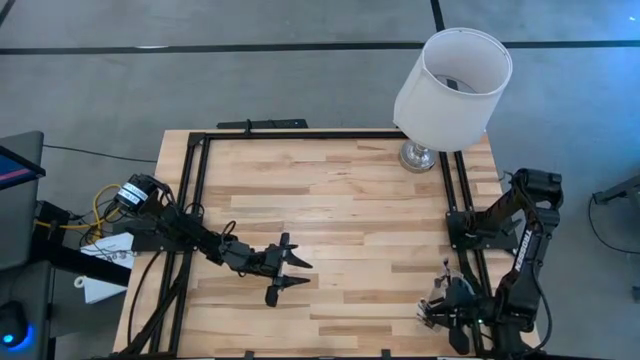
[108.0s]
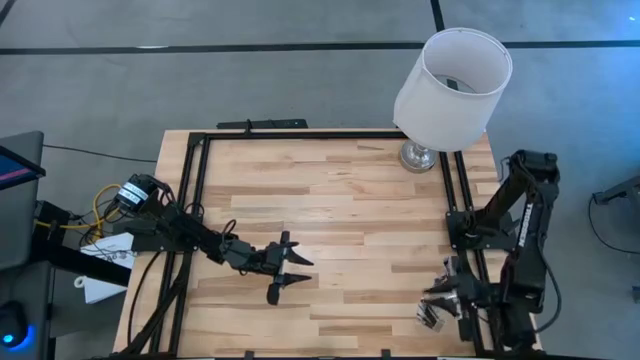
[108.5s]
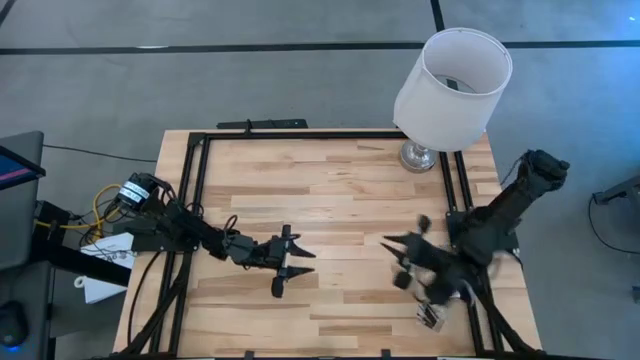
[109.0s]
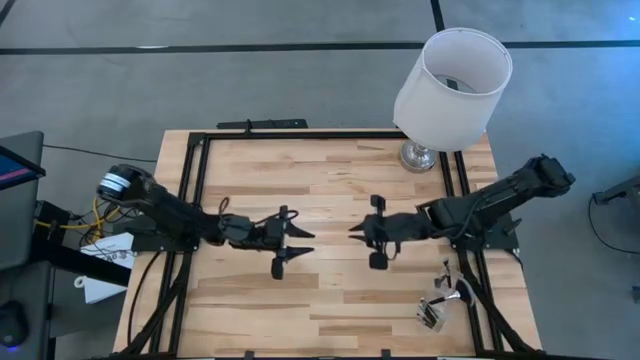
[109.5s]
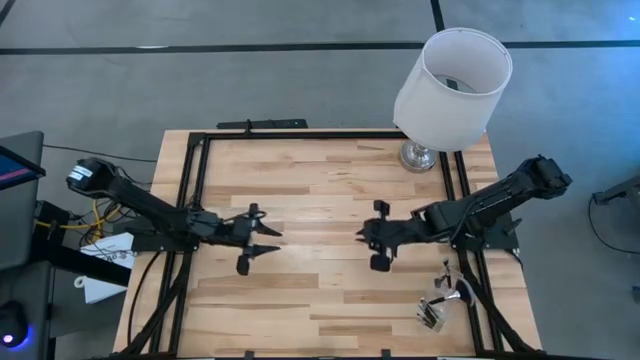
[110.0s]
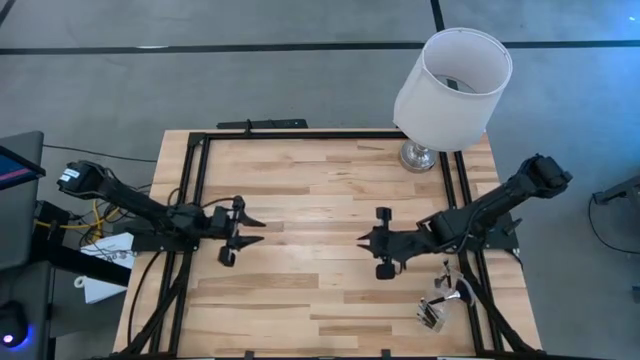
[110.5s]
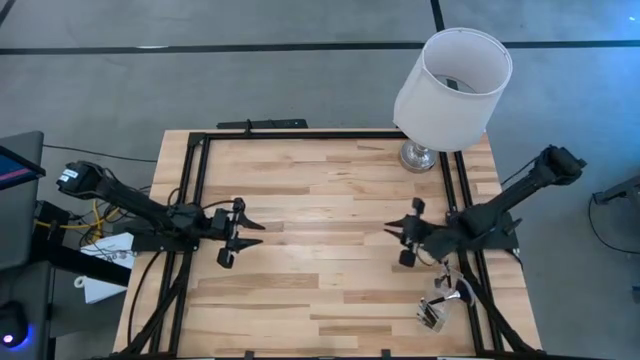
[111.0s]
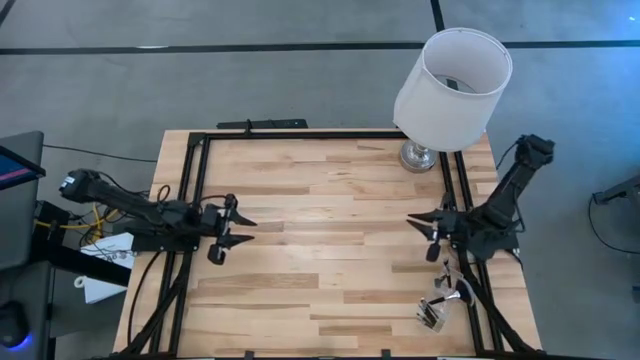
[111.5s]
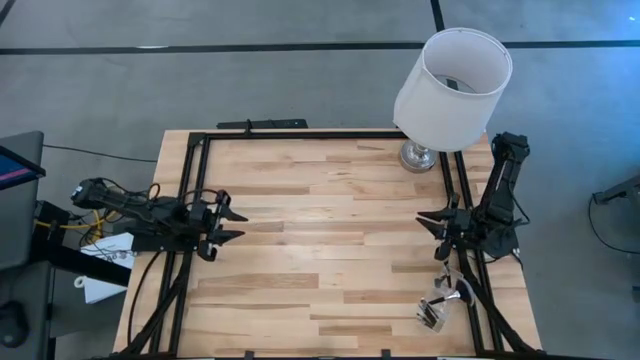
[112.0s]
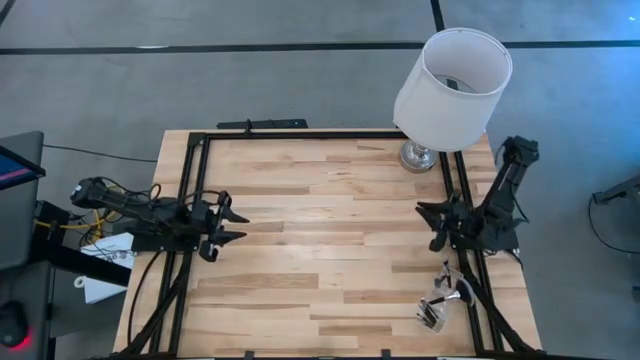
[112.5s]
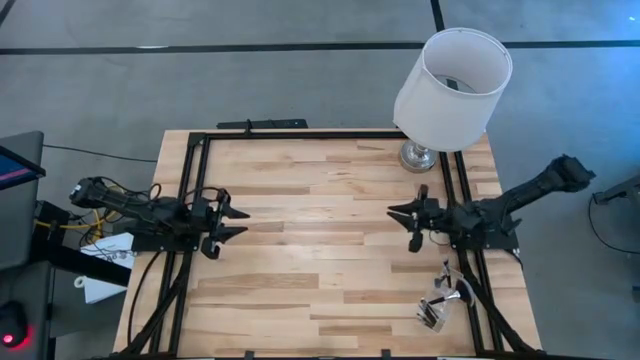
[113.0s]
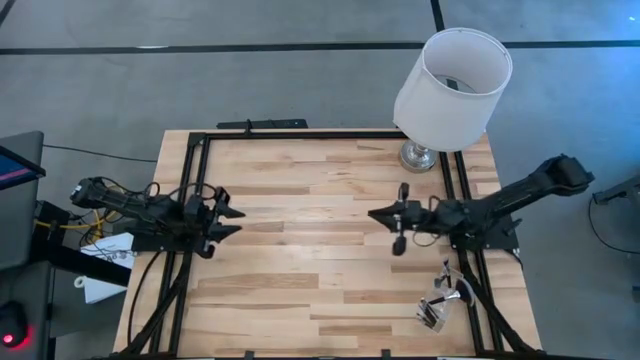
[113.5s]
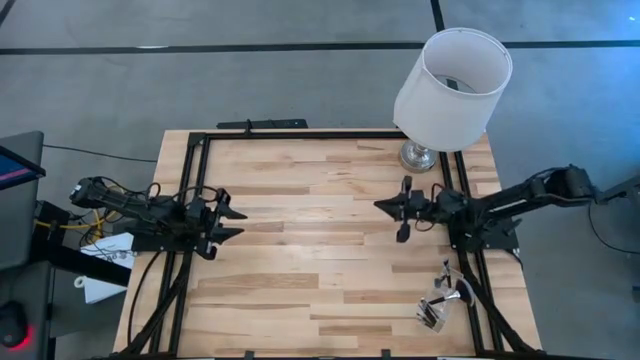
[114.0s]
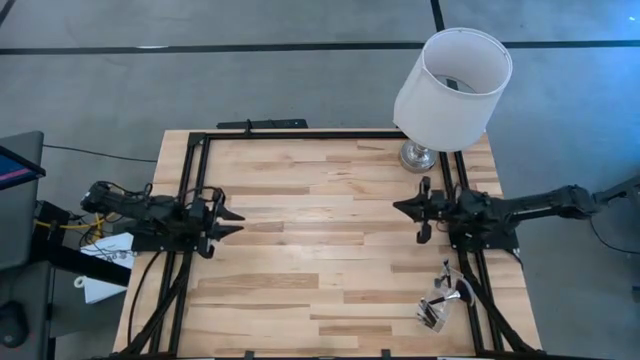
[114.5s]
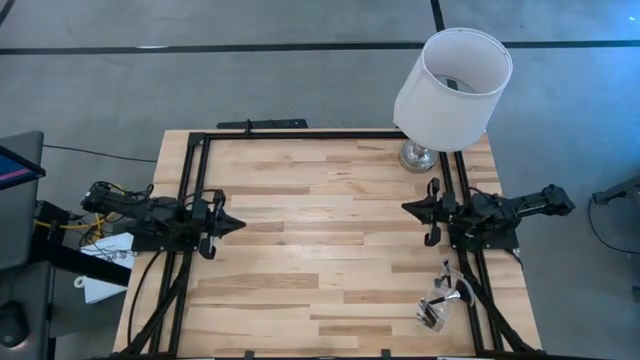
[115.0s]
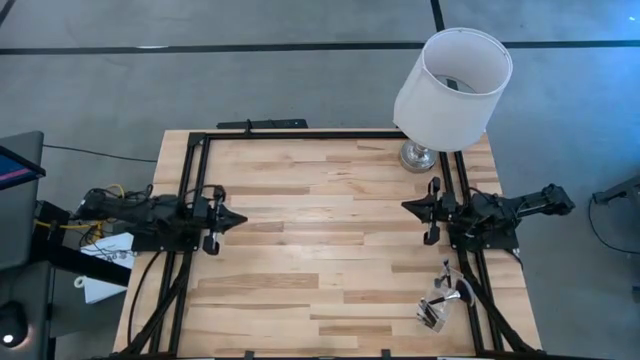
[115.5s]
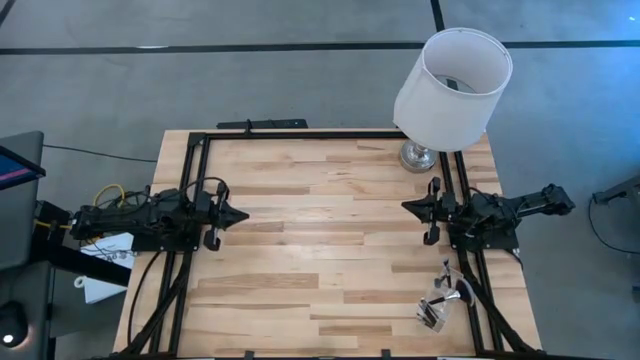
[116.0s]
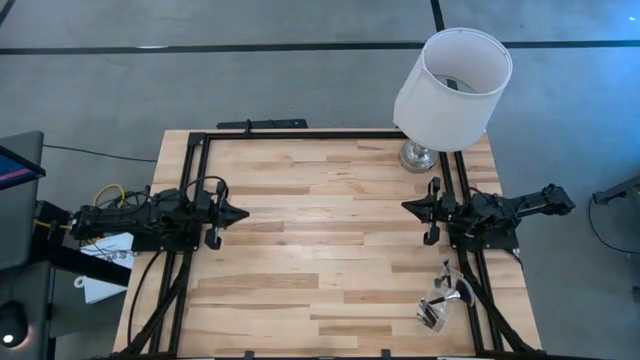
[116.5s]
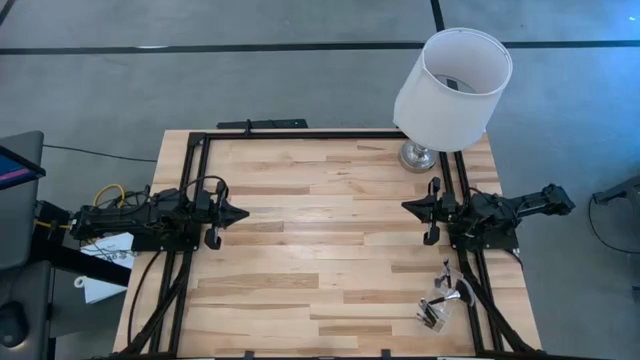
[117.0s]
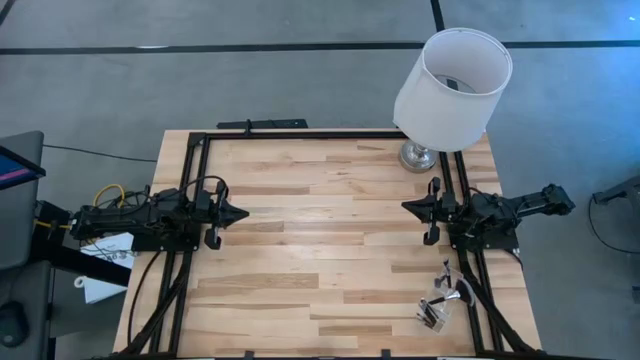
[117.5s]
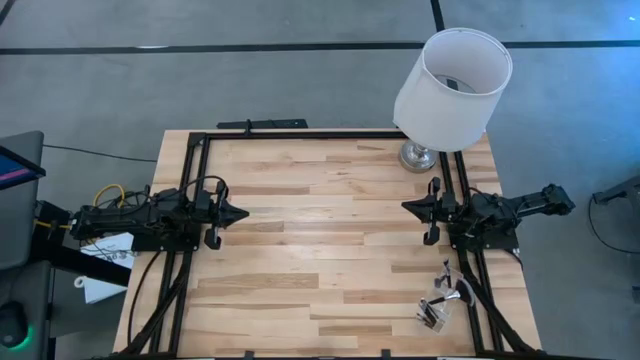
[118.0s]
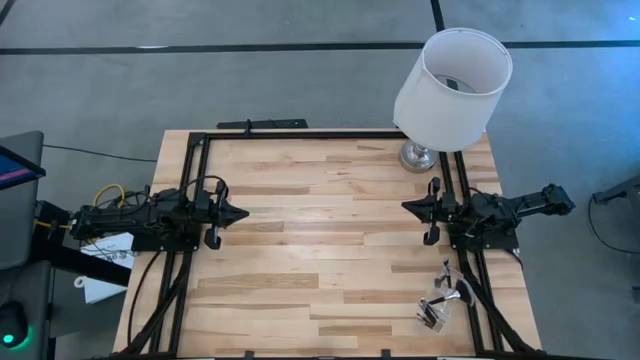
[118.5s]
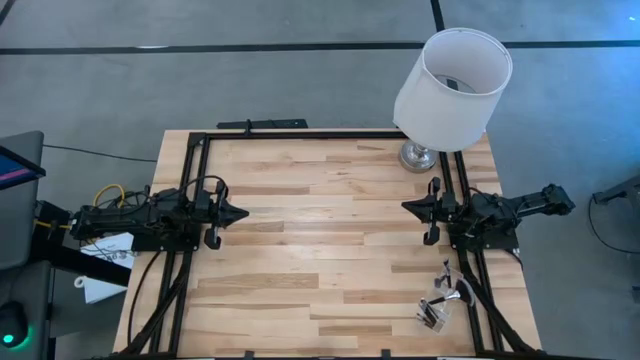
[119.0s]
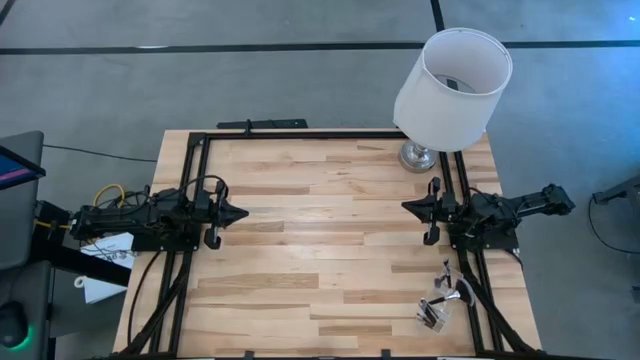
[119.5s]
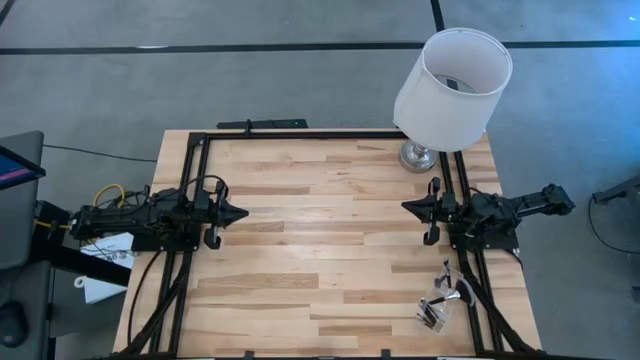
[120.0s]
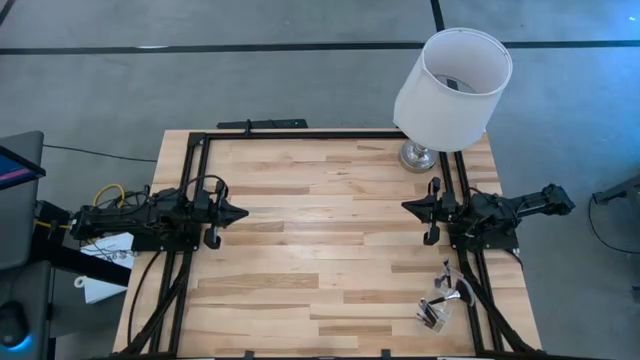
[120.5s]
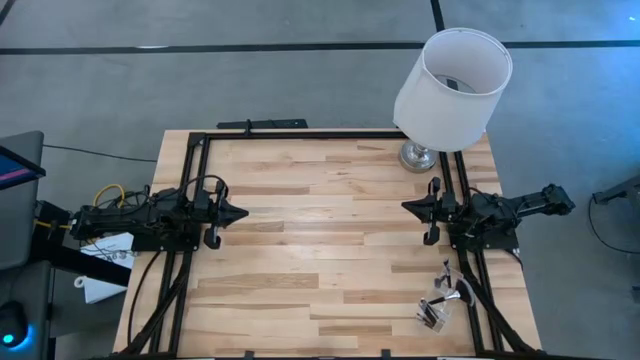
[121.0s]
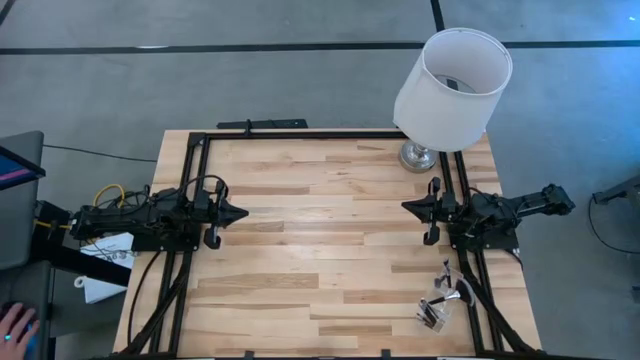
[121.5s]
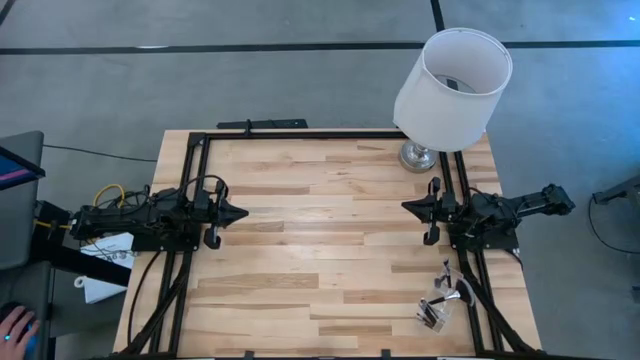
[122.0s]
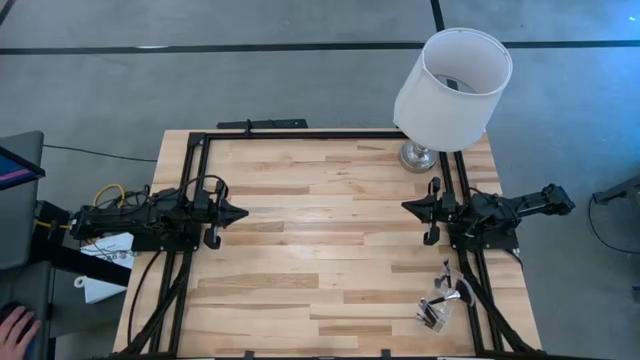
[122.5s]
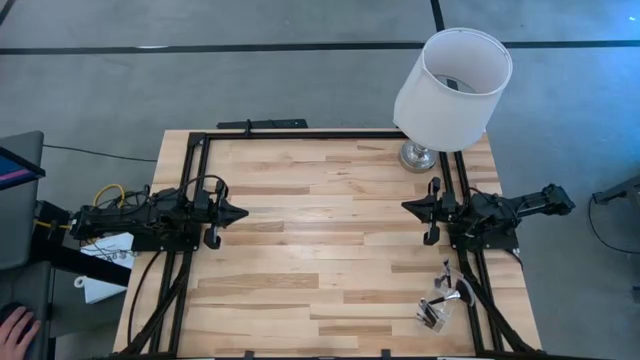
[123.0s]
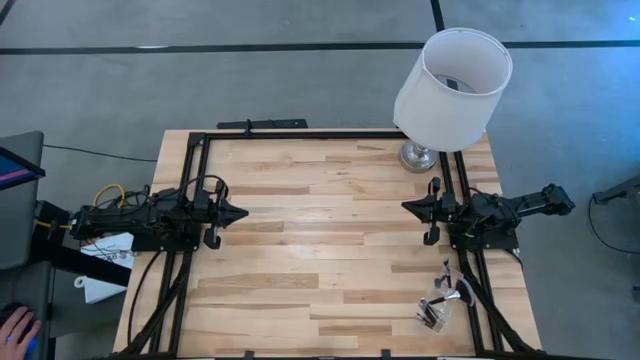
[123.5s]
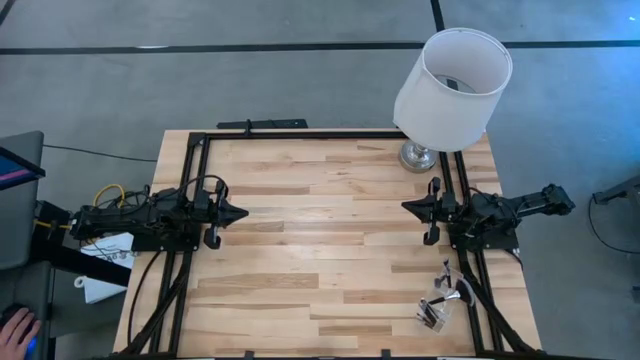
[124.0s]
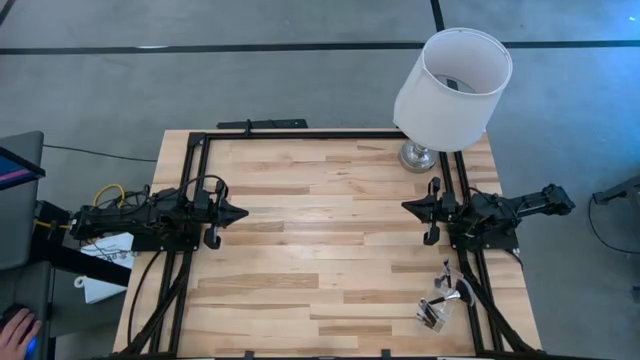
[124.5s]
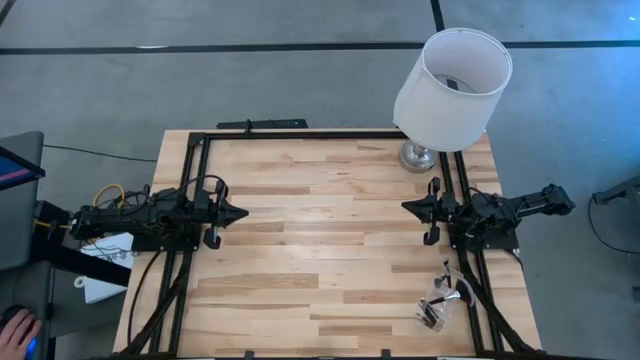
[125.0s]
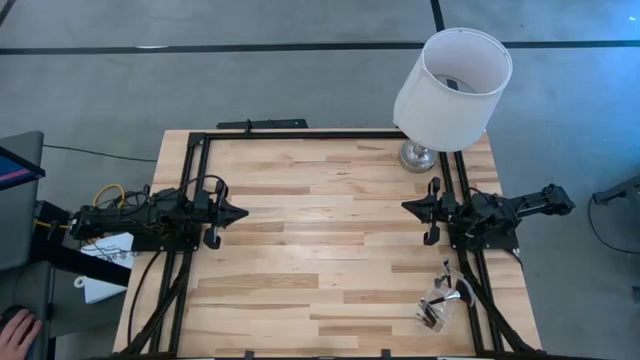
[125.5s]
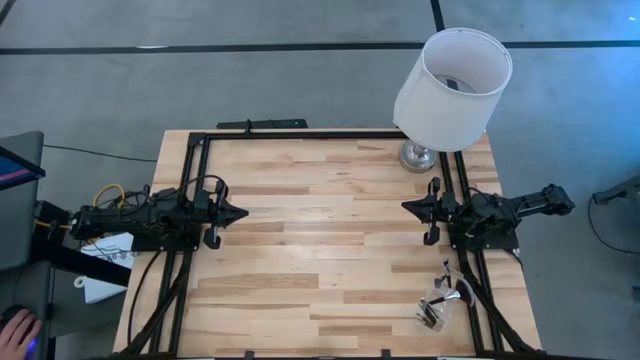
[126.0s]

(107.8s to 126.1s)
Task: Pick & Place Makeup Brushes
Return to Home Position

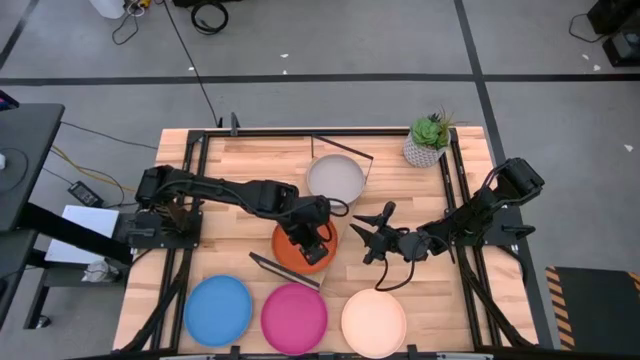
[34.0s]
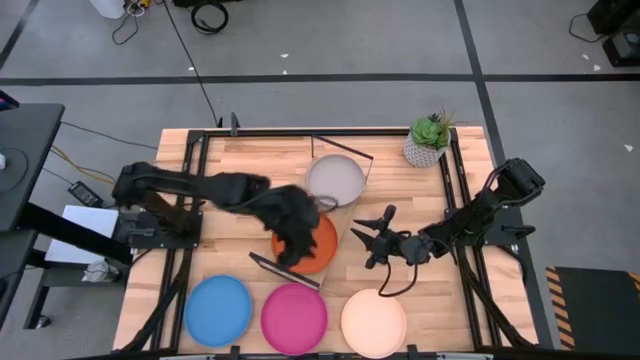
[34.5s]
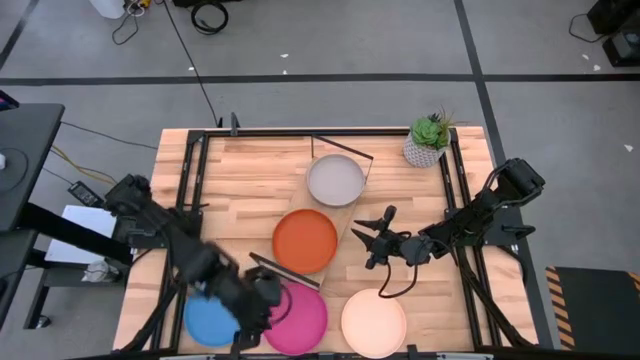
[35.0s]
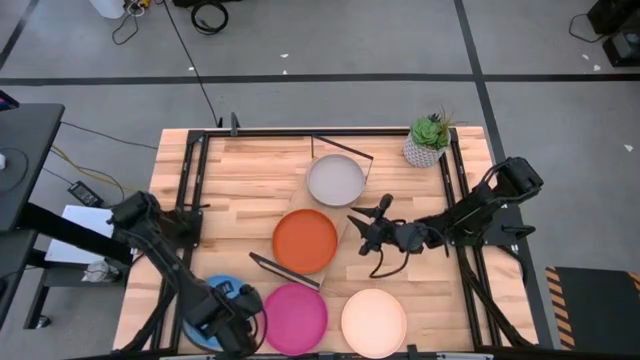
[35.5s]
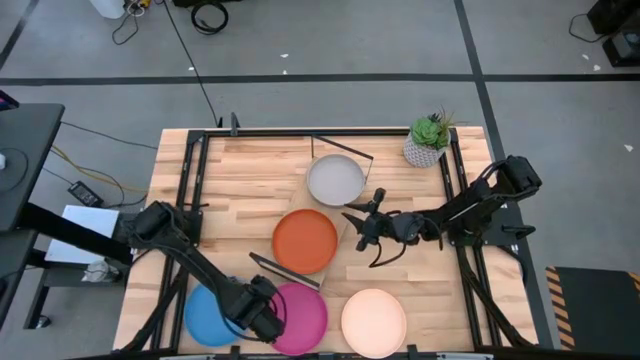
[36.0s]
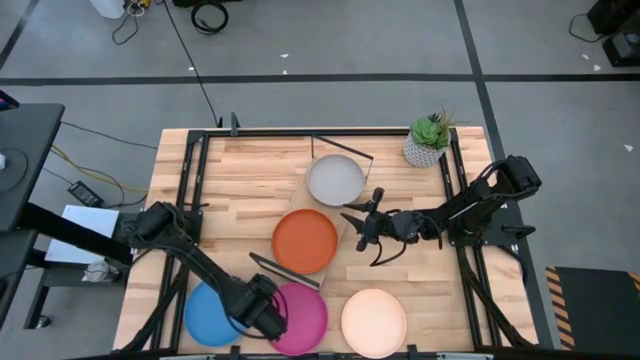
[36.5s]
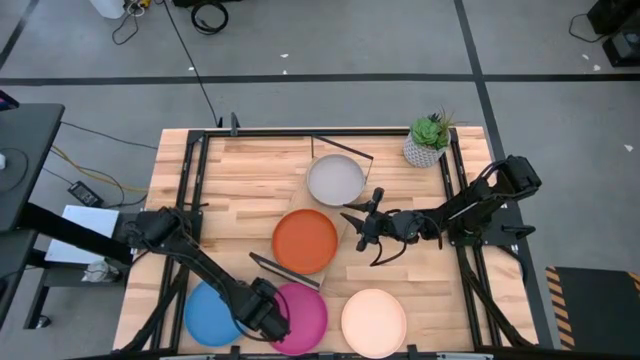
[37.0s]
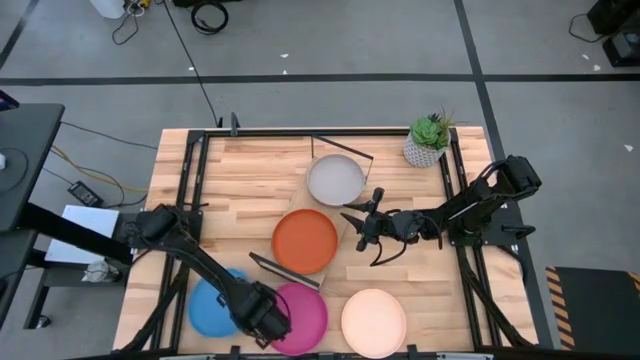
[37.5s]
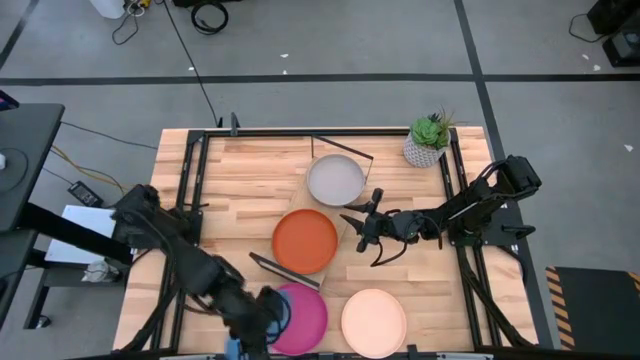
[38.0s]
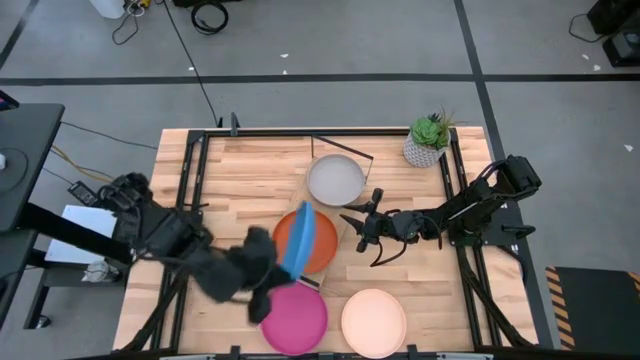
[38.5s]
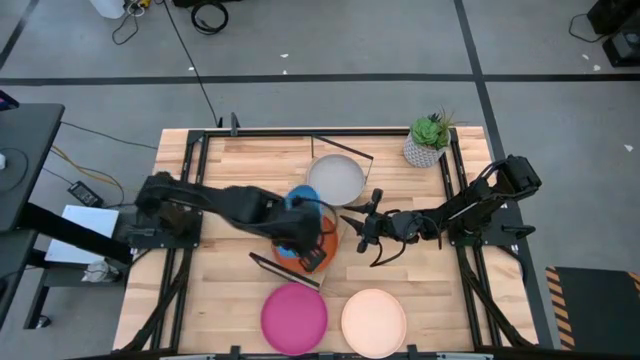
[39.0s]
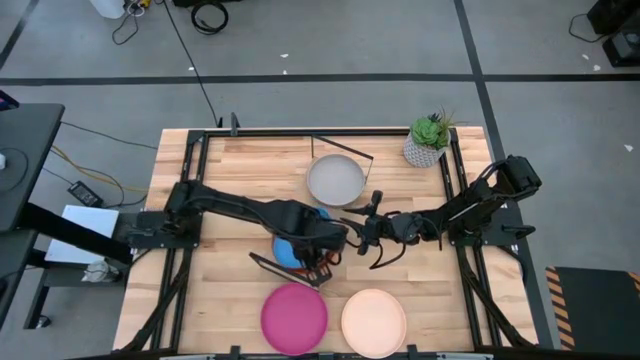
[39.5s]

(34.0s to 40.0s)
Task: Place and stack plates onto a shelf
Stack the blue plate on the top of the orange plate on the shelf
